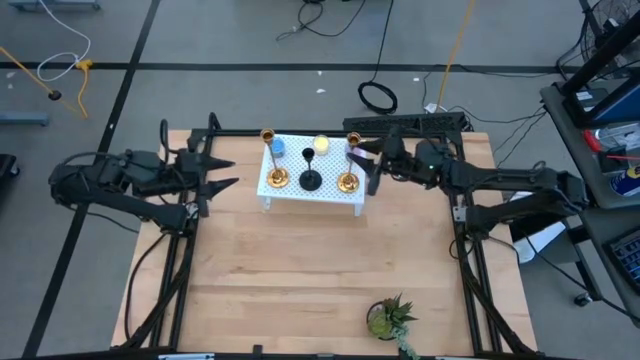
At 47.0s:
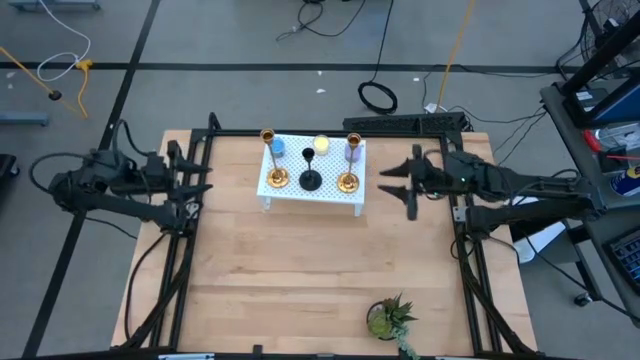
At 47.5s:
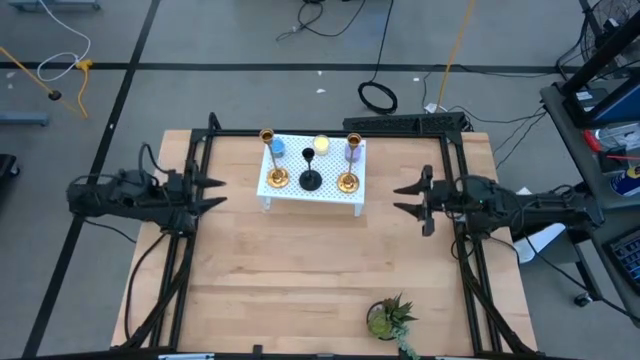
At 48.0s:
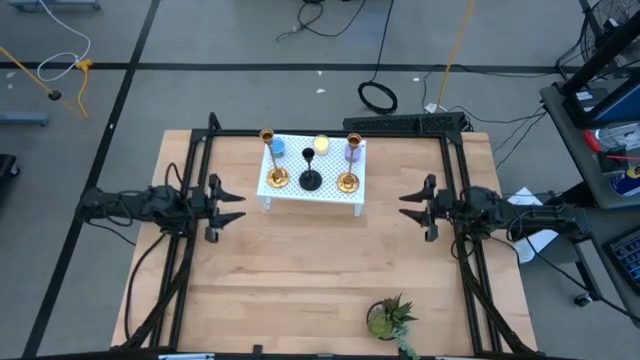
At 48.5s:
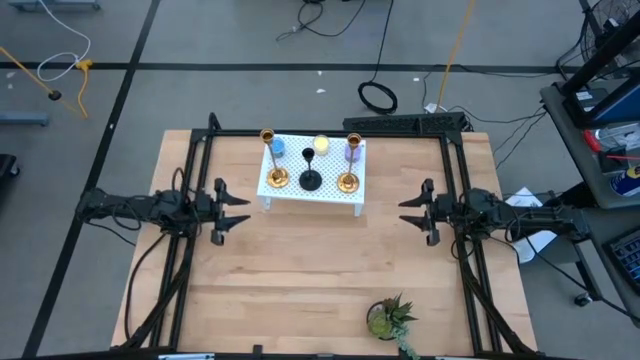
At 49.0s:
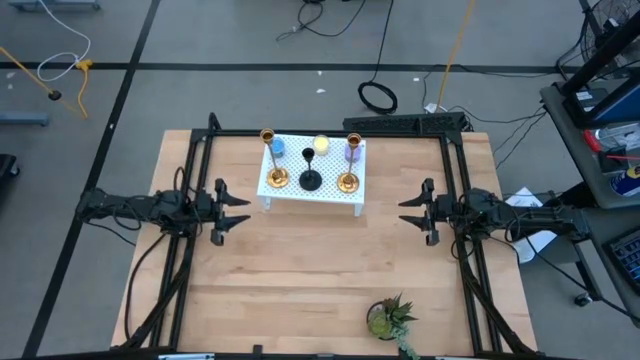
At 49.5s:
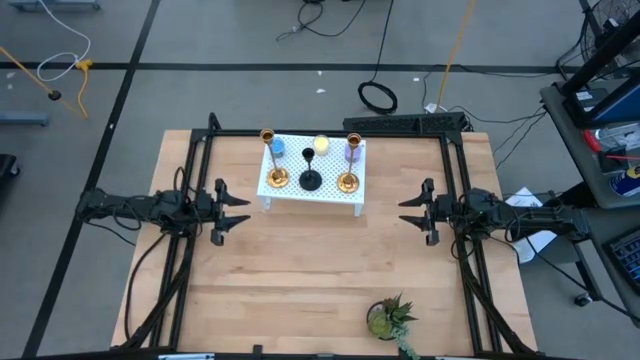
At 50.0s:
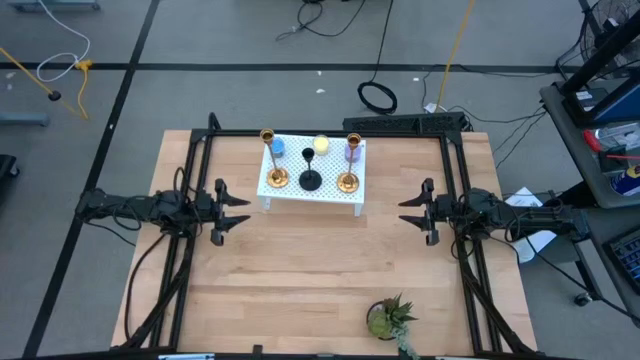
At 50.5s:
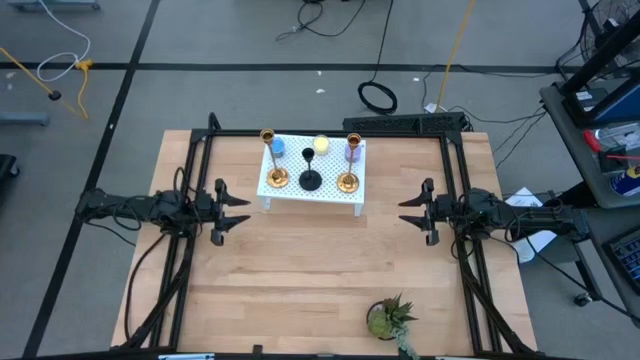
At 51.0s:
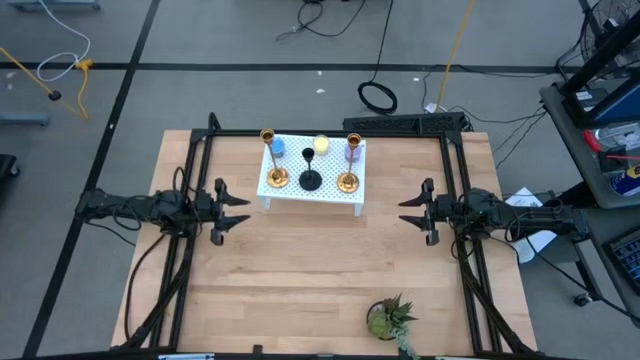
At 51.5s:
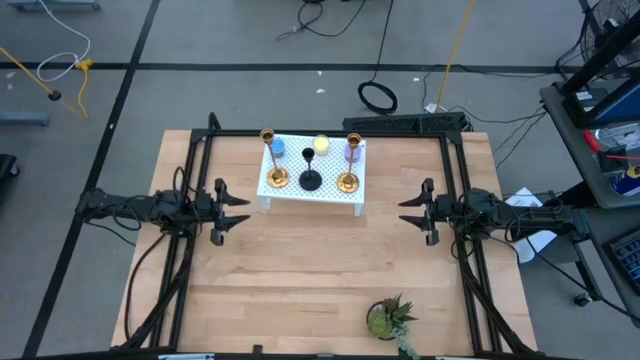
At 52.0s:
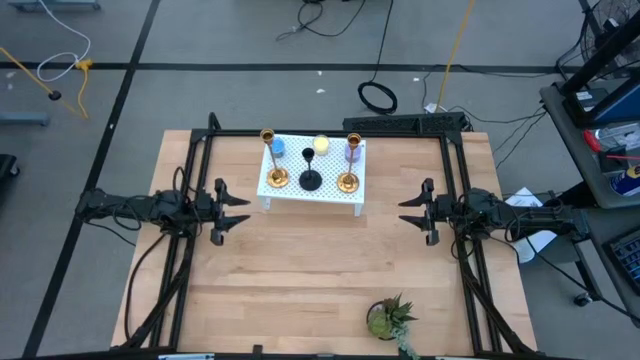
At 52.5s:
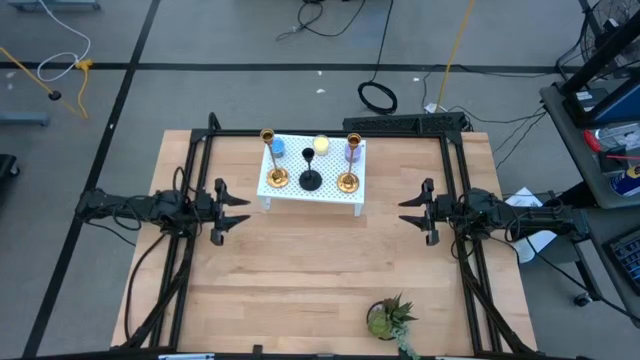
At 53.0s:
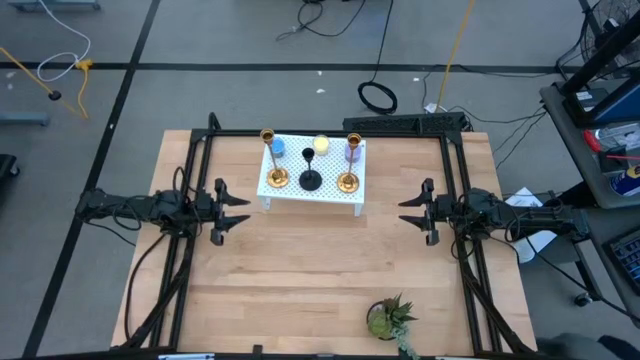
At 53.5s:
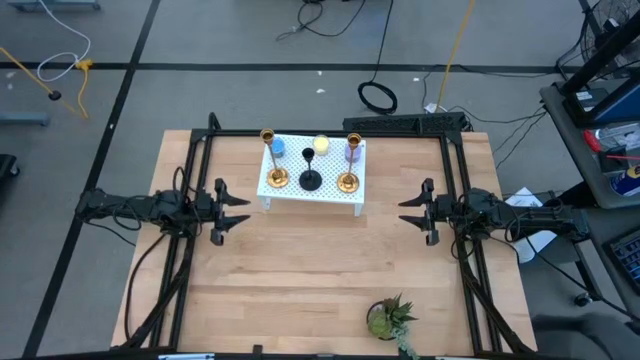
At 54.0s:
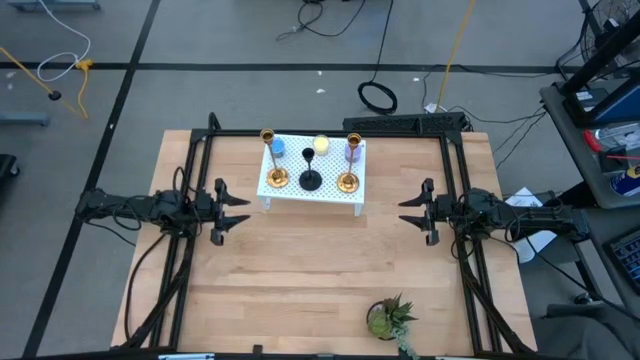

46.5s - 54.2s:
Task: Pick & Place candle stick holders
Return to Home Position

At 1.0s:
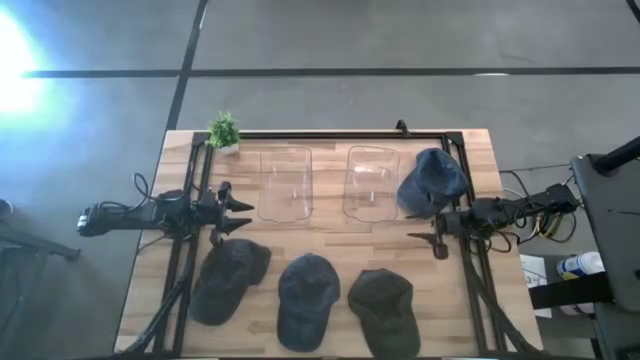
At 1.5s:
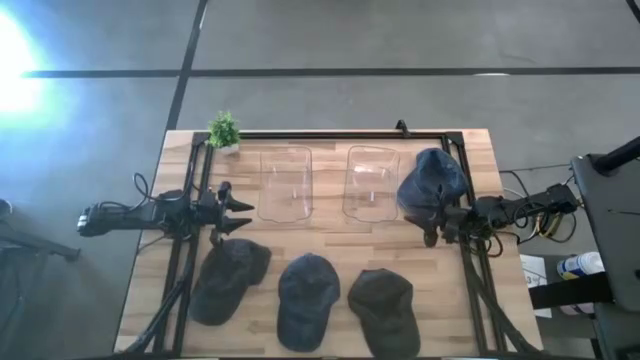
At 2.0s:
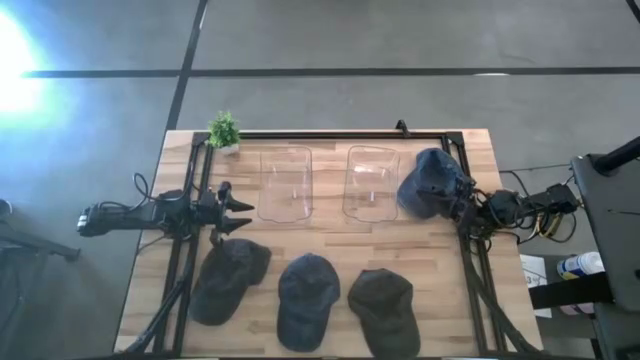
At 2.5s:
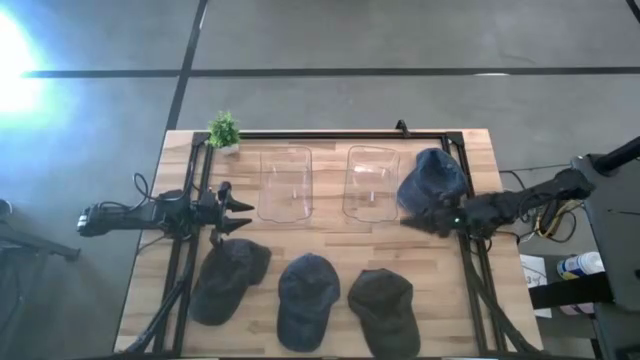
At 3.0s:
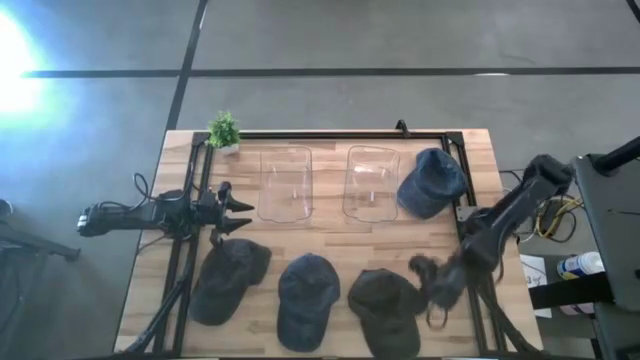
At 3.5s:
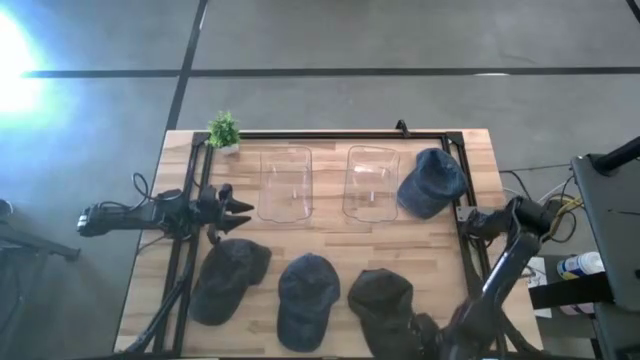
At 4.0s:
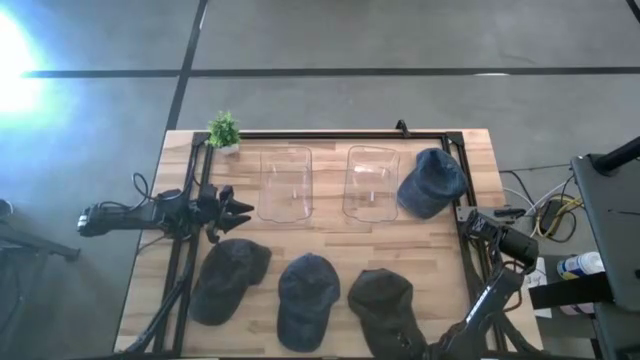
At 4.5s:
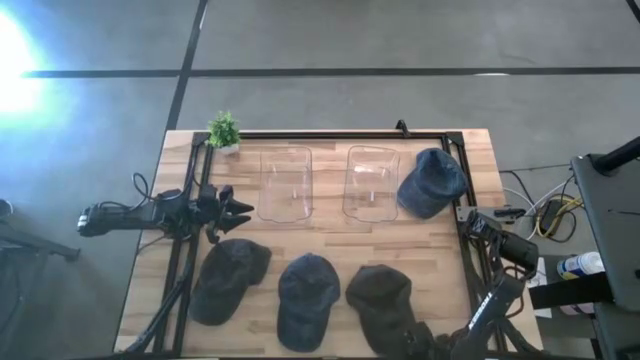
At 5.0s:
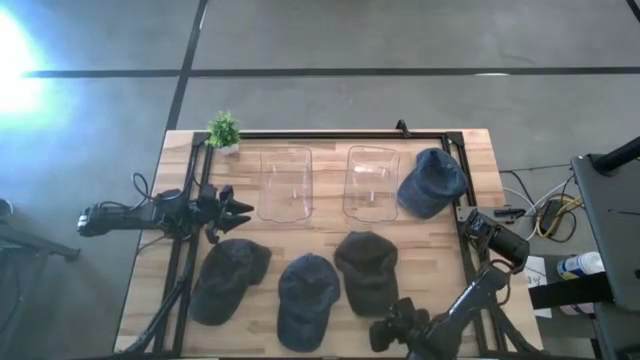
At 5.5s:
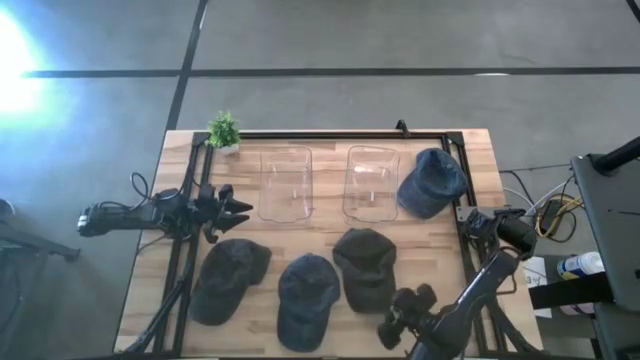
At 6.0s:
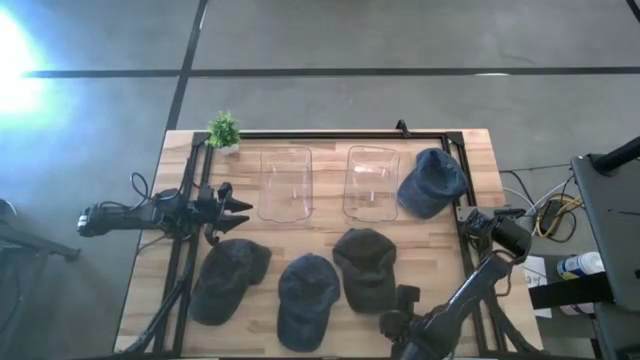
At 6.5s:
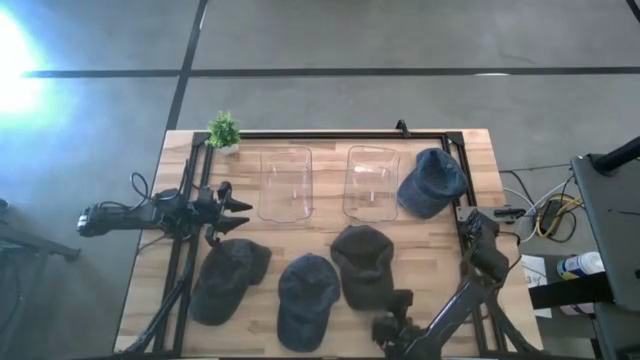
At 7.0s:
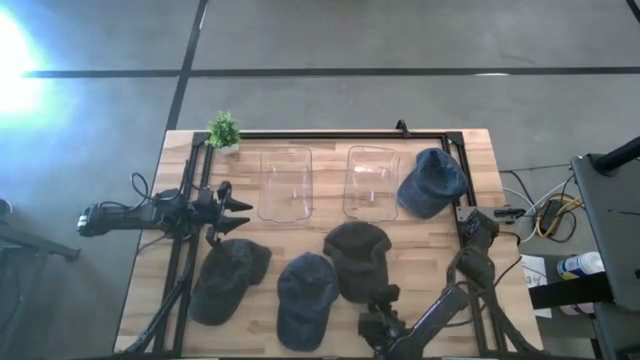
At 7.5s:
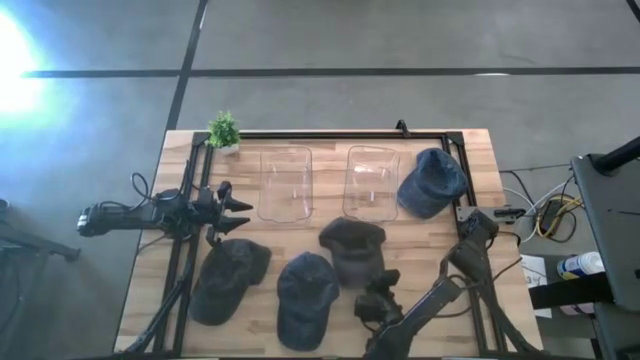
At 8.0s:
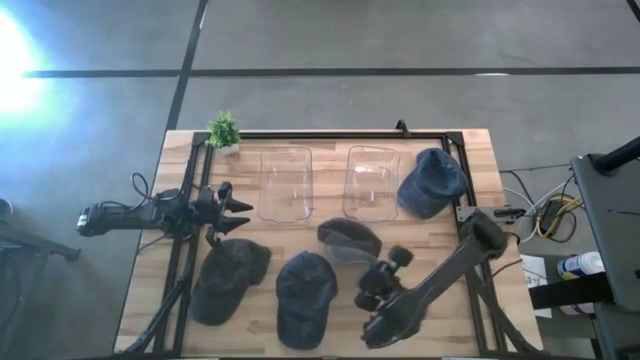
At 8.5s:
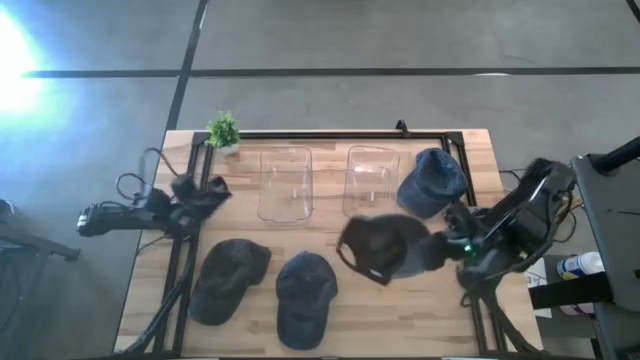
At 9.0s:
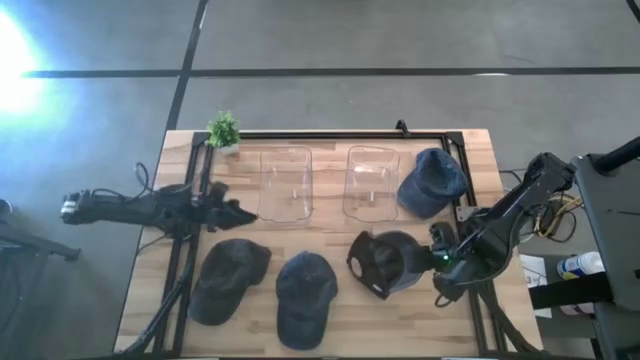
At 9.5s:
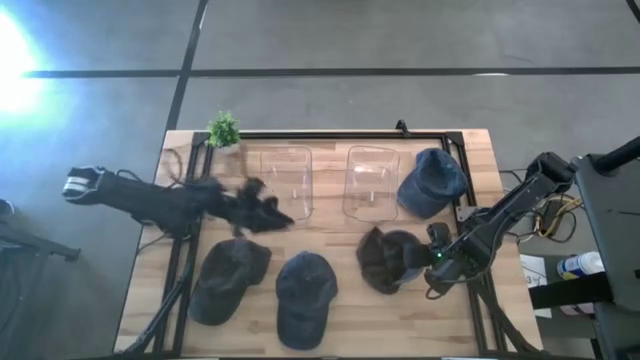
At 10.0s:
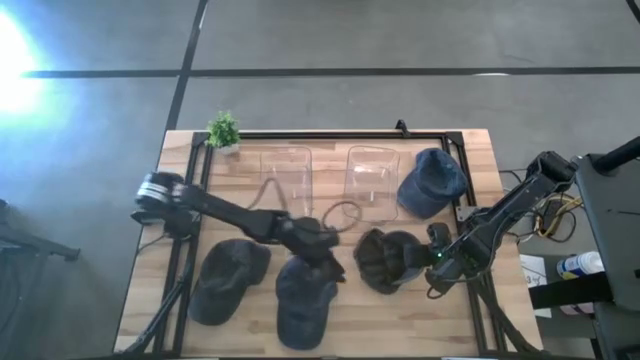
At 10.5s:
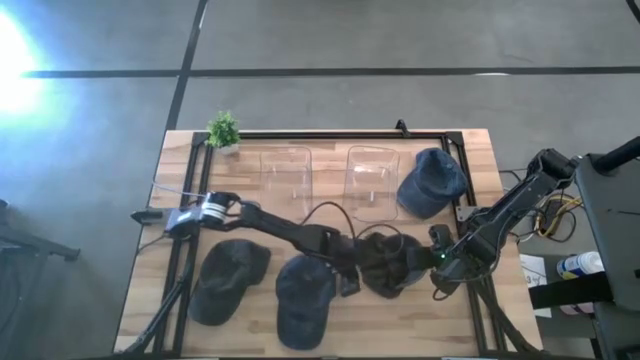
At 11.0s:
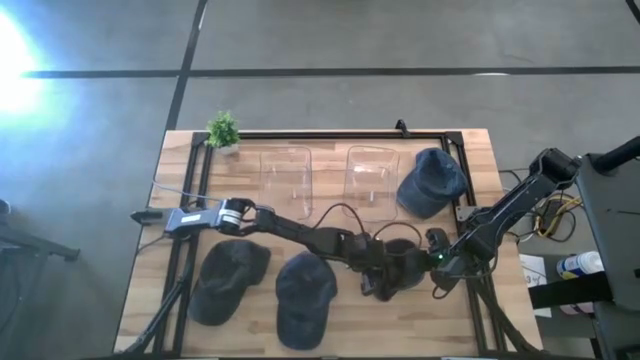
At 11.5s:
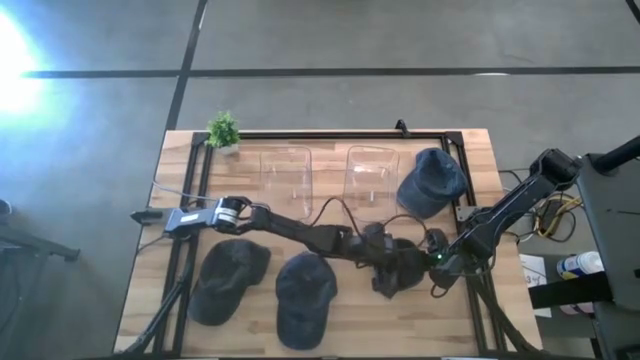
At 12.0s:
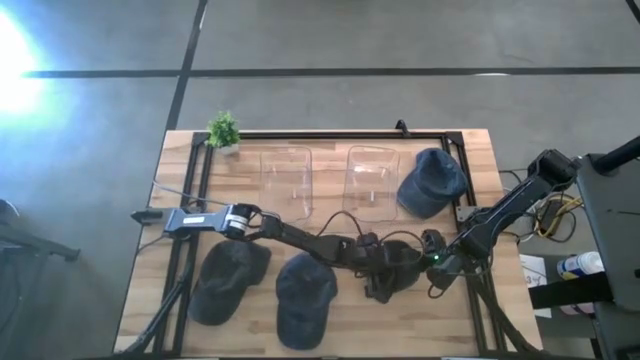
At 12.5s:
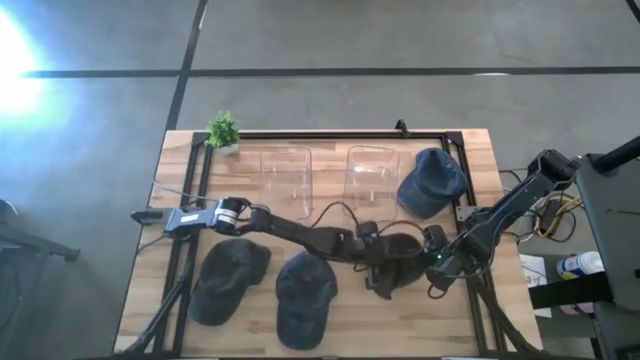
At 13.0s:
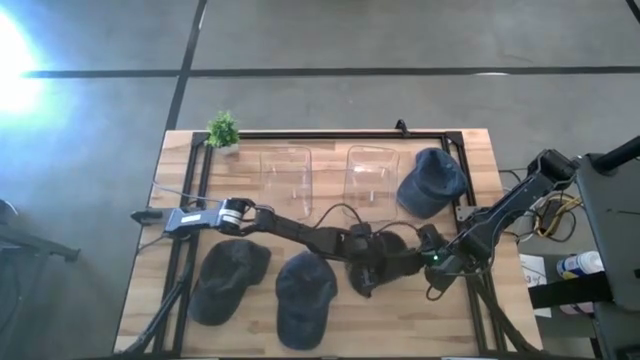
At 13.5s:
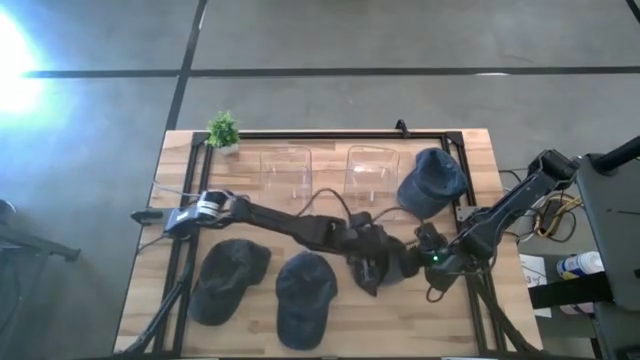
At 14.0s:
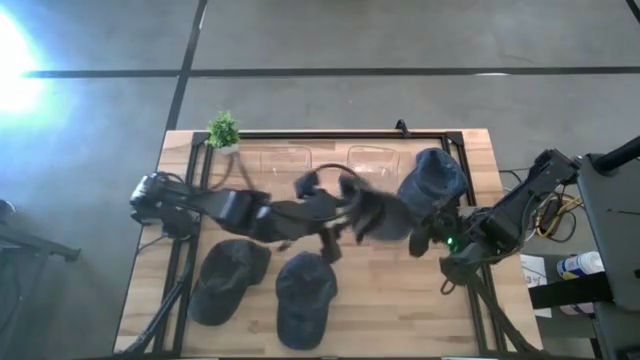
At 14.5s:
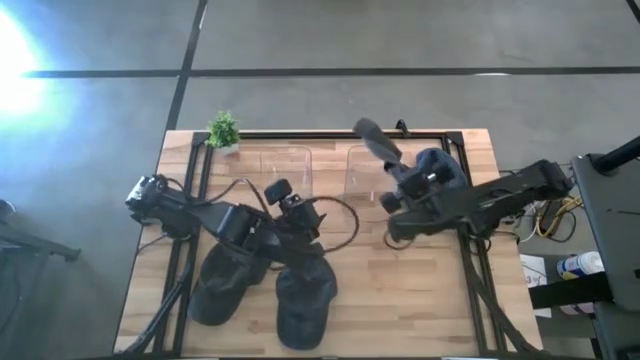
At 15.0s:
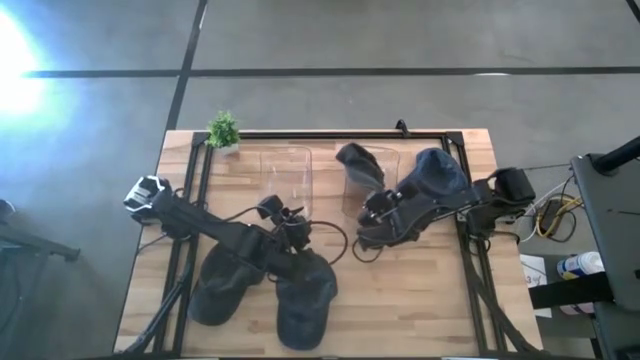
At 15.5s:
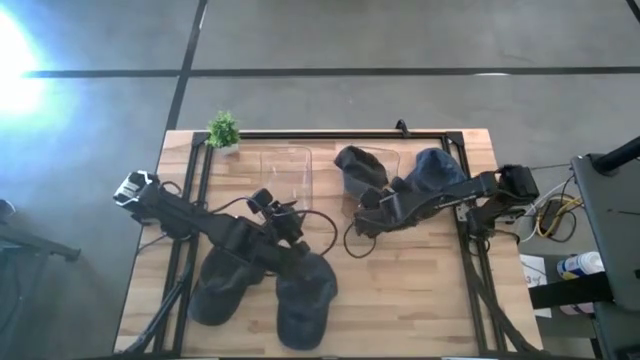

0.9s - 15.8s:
Task: Pick & Place hat
Put the right gray cap into the right transparent bin
